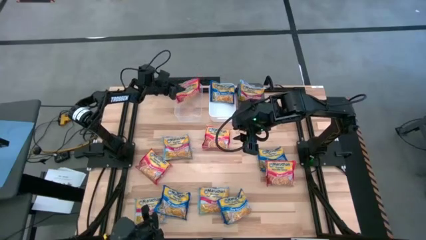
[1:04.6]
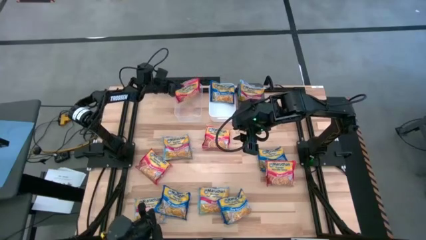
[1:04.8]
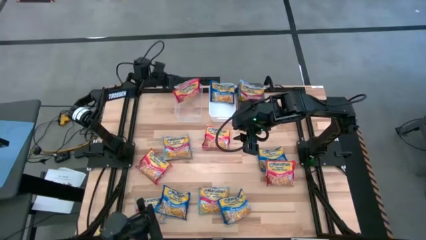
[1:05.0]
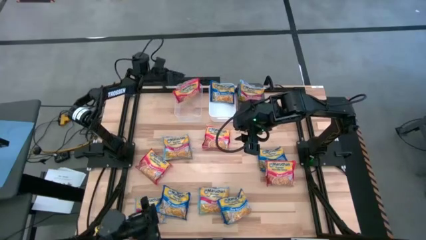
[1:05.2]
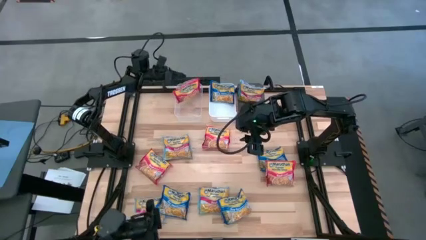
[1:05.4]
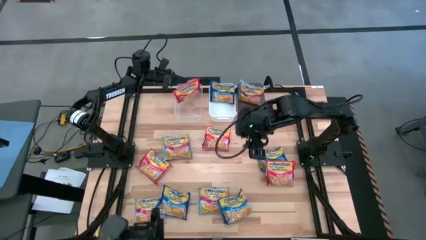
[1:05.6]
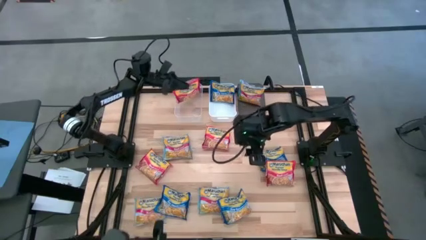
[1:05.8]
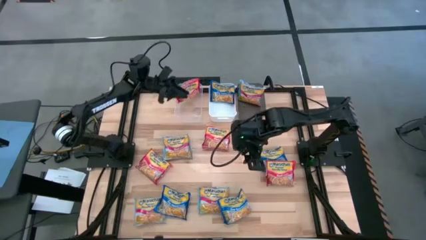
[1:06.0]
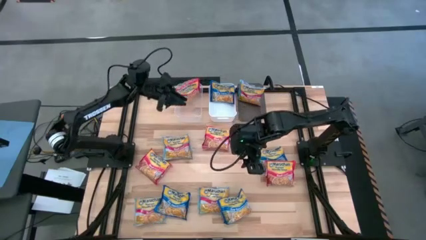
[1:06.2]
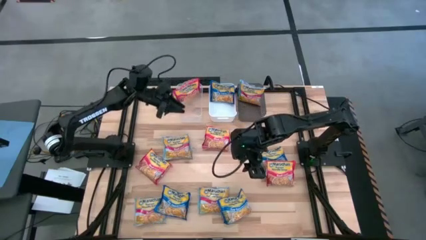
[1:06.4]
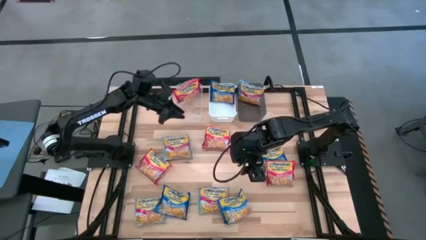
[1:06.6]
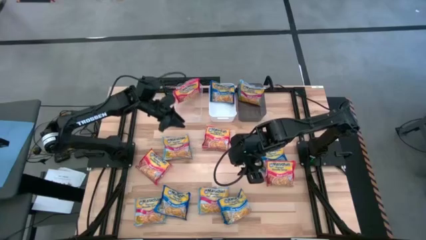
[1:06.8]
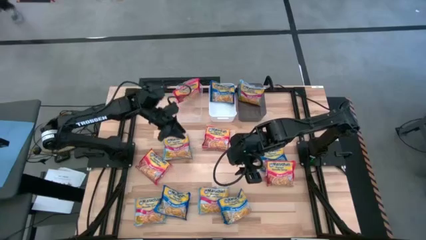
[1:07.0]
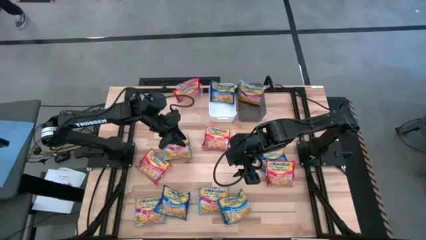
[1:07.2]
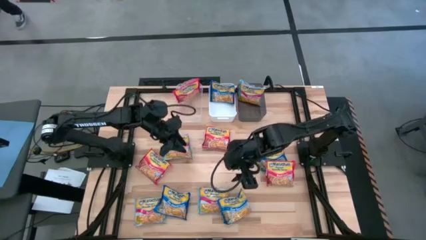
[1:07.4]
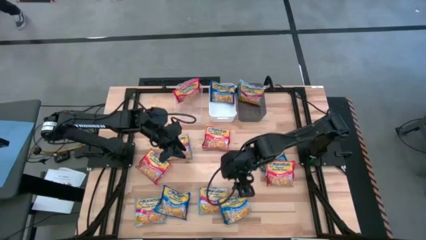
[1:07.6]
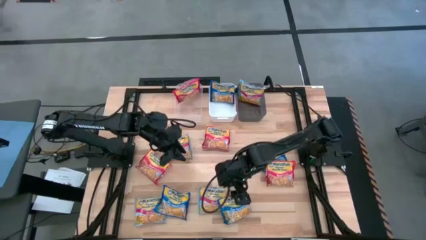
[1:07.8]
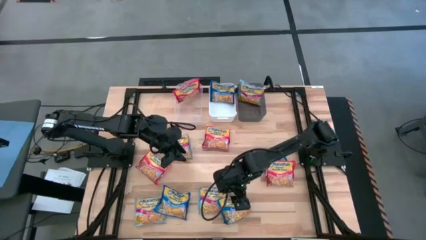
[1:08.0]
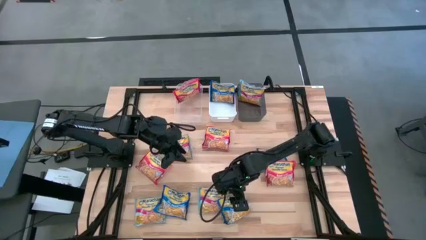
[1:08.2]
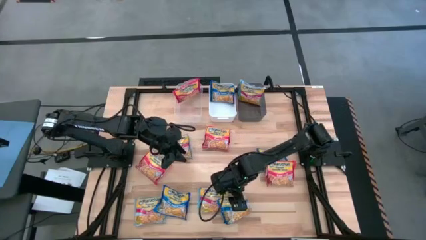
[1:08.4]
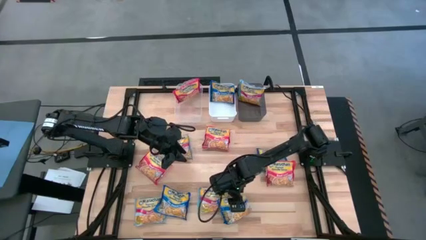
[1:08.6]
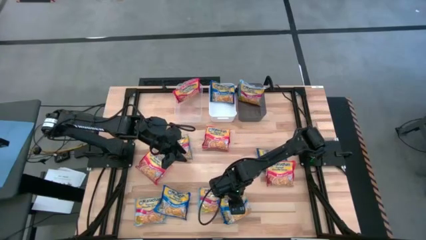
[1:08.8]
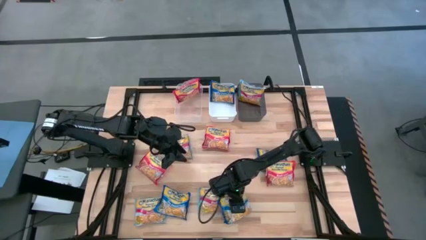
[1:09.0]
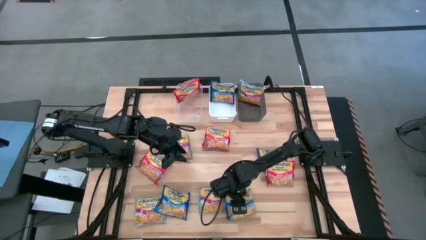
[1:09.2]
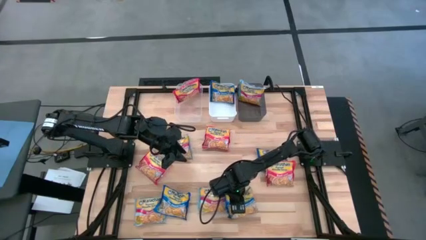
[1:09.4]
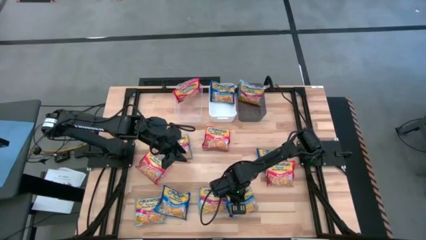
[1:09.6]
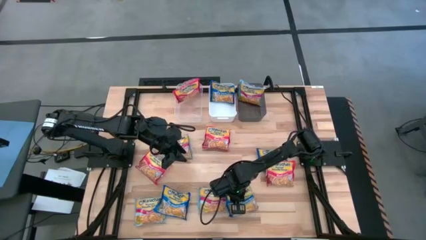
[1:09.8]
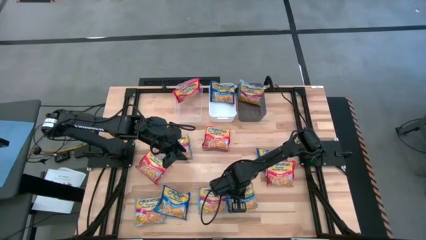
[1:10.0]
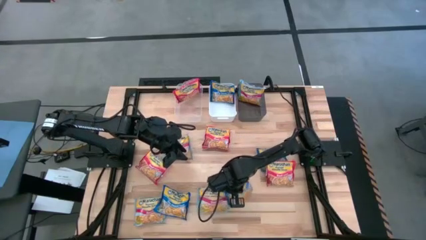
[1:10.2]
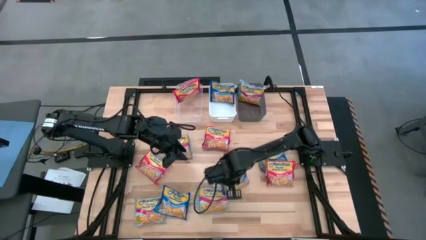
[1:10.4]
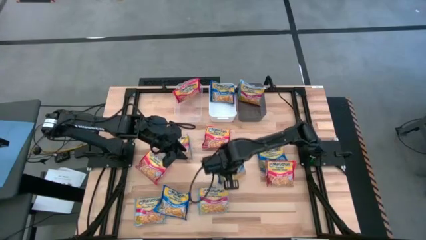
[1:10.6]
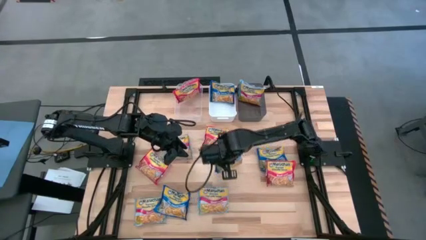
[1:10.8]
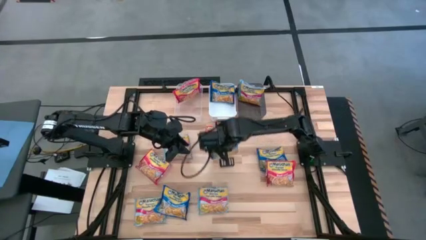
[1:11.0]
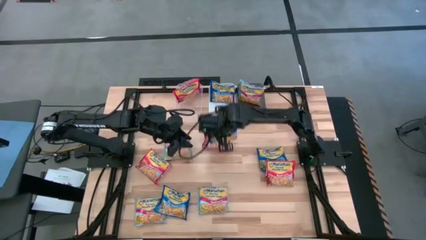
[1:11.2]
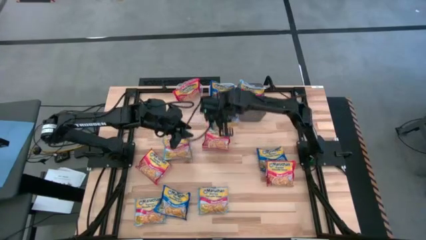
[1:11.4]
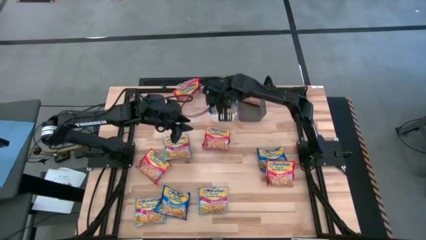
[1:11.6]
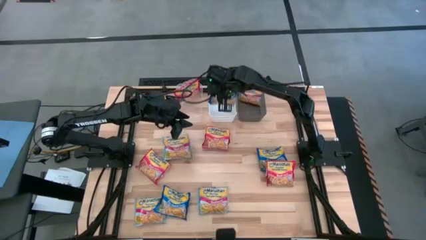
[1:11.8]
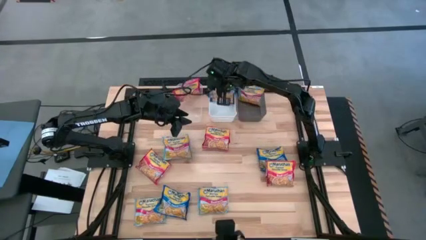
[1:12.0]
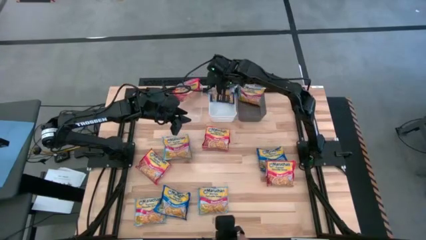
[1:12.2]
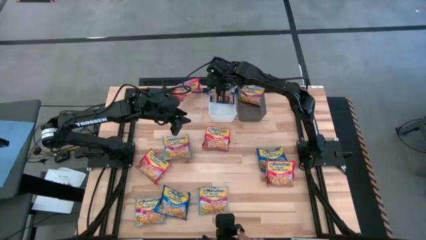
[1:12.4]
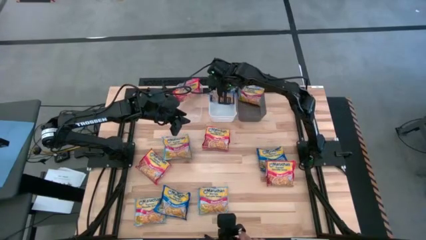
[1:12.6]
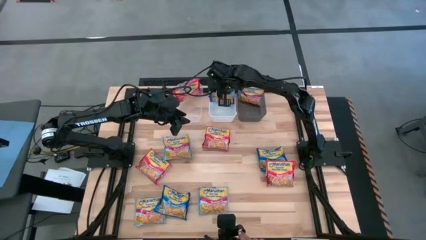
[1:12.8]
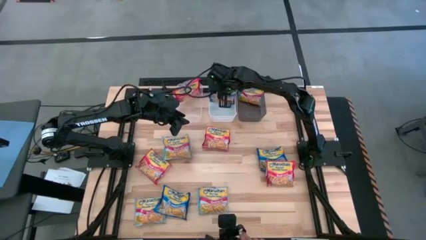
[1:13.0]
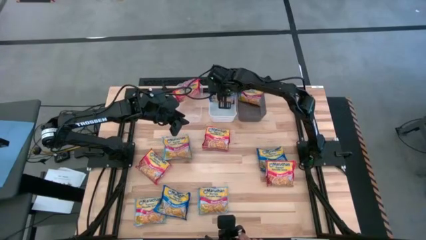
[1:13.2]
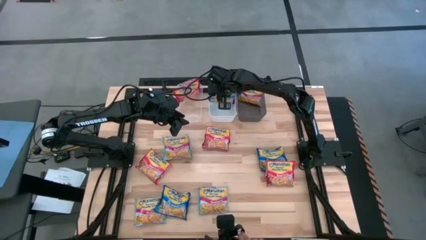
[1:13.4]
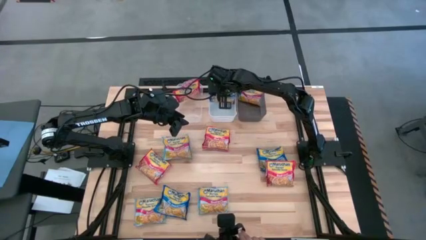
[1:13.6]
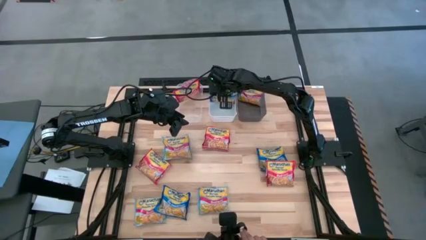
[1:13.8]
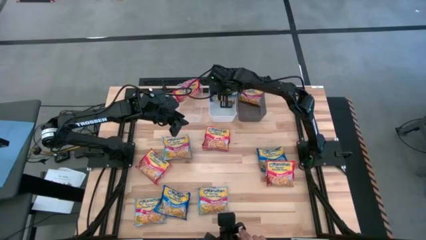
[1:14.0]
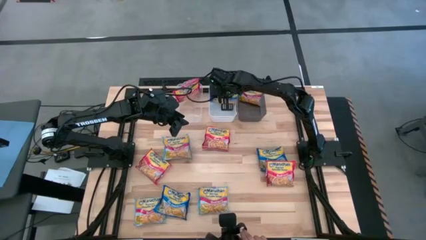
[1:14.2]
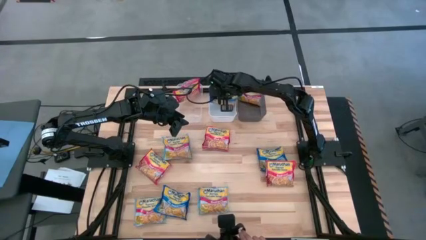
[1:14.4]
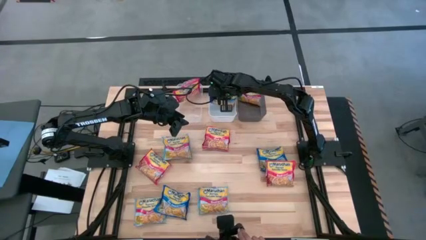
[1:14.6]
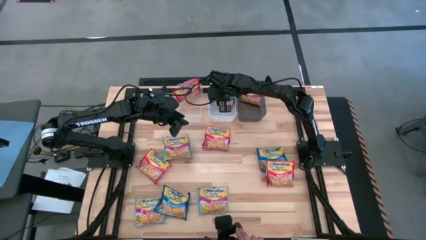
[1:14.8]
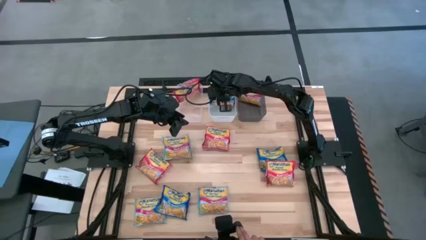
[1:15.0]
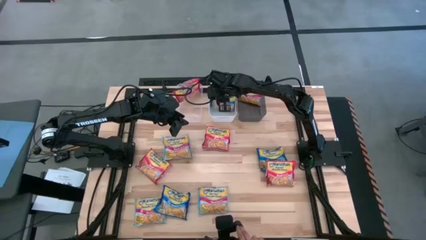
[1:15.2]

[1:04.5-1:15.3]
Task: Sort Maruchan noodles
Put the blue noodle pack into the white bin

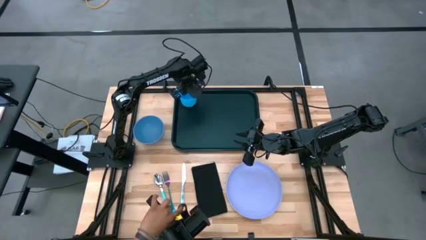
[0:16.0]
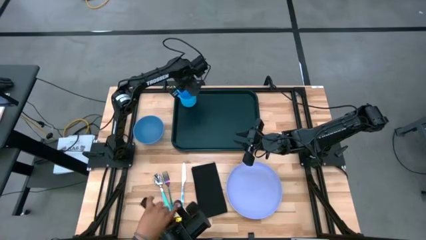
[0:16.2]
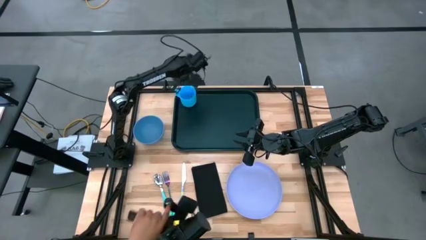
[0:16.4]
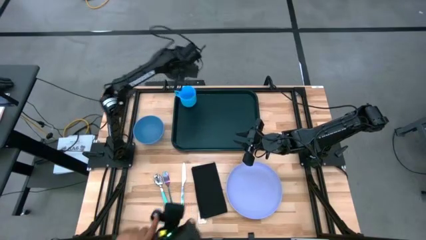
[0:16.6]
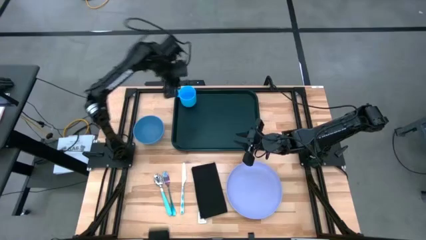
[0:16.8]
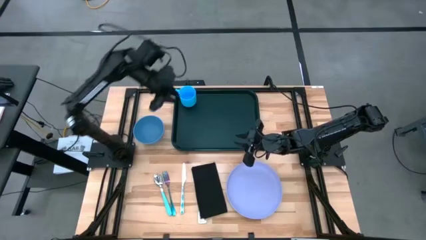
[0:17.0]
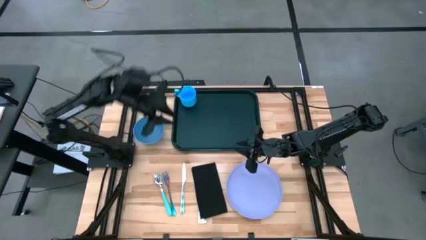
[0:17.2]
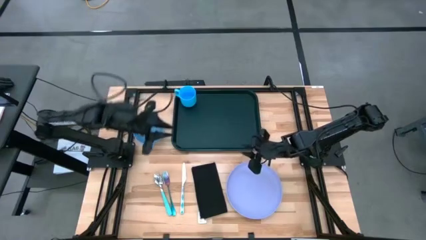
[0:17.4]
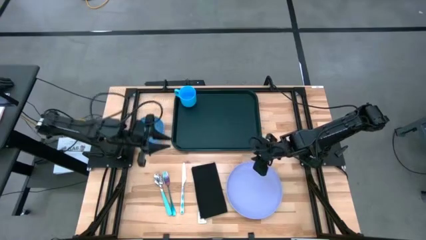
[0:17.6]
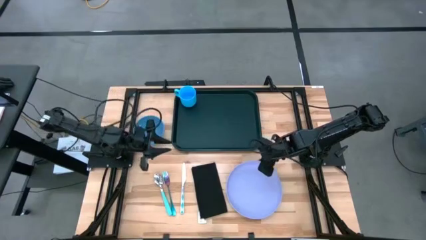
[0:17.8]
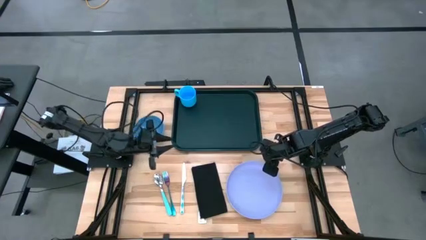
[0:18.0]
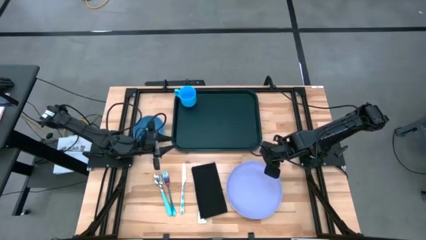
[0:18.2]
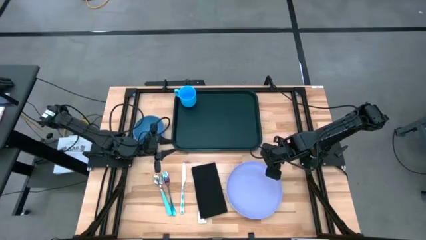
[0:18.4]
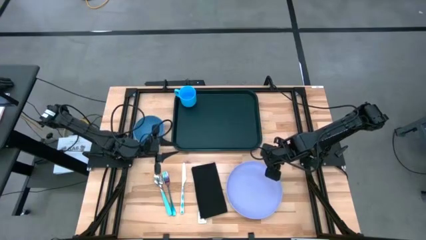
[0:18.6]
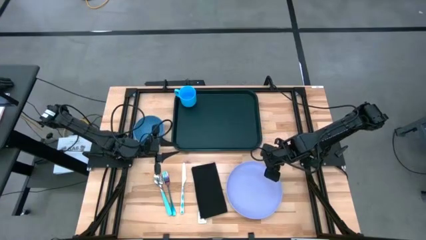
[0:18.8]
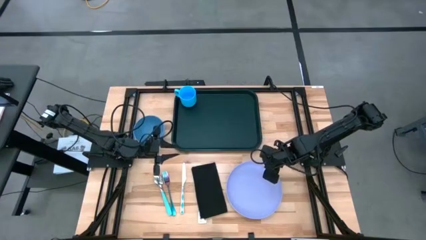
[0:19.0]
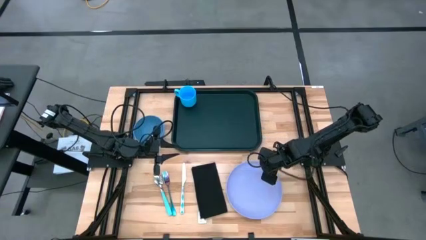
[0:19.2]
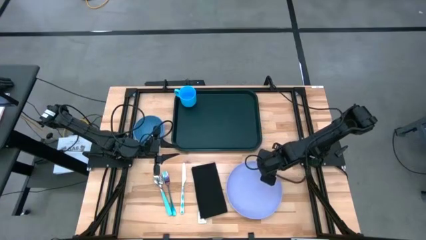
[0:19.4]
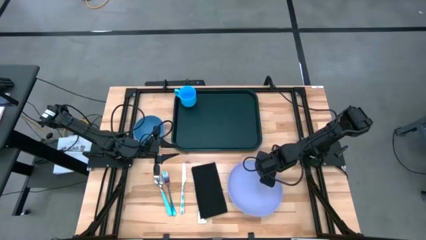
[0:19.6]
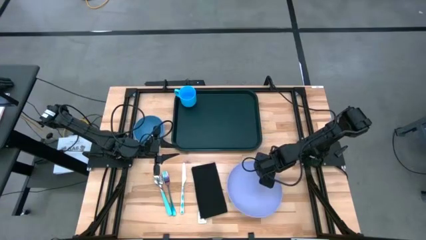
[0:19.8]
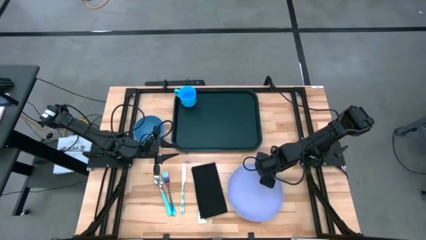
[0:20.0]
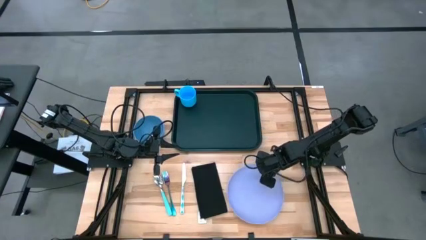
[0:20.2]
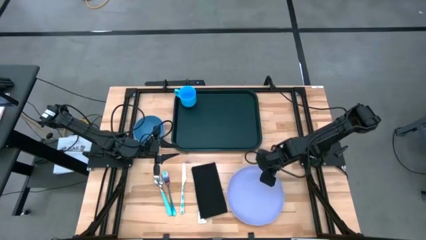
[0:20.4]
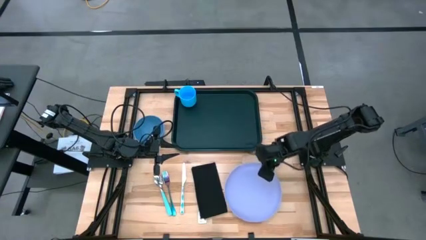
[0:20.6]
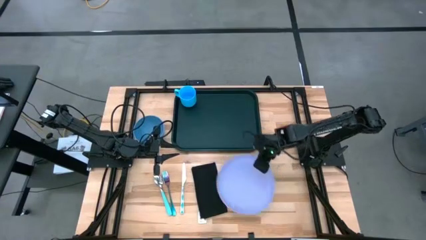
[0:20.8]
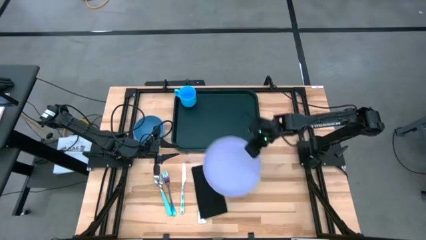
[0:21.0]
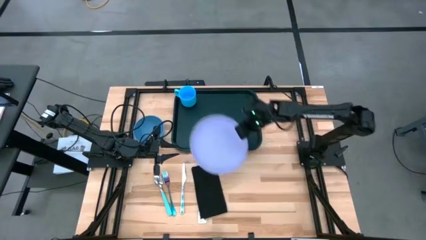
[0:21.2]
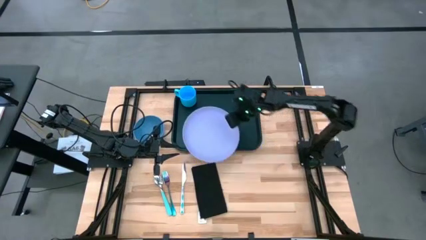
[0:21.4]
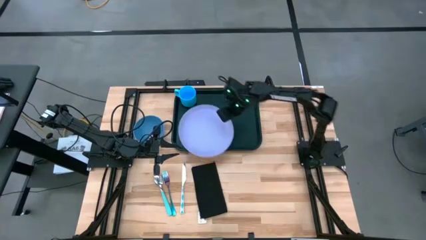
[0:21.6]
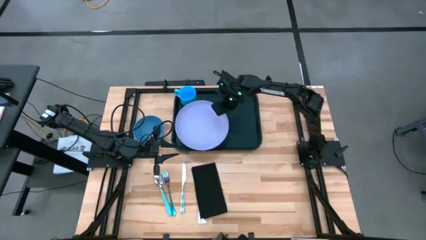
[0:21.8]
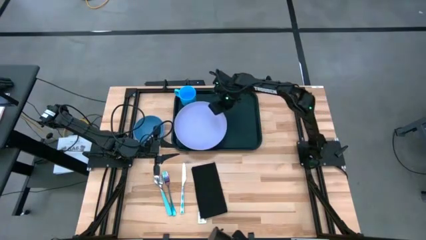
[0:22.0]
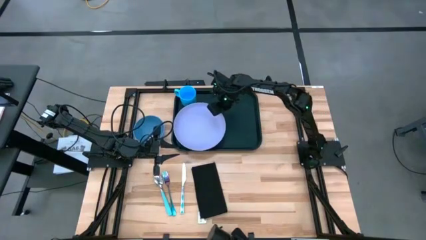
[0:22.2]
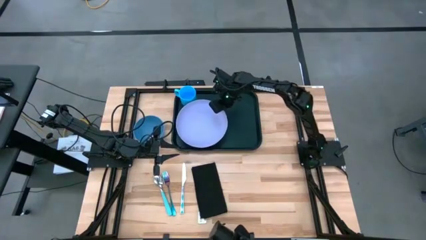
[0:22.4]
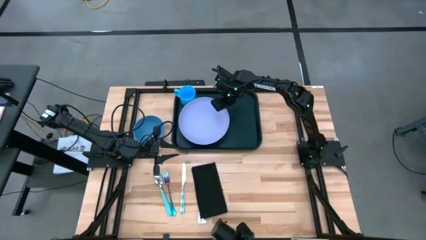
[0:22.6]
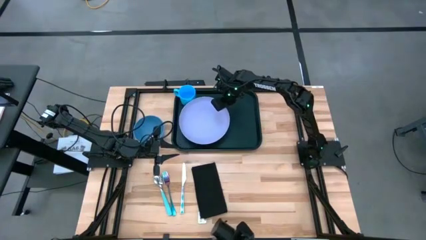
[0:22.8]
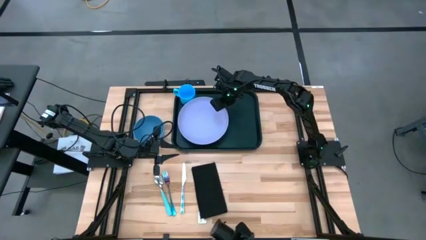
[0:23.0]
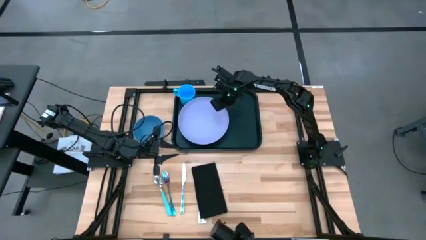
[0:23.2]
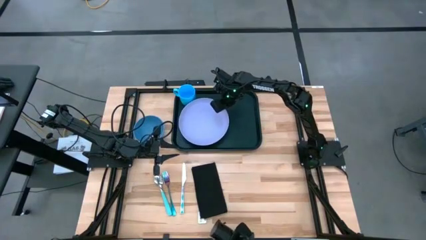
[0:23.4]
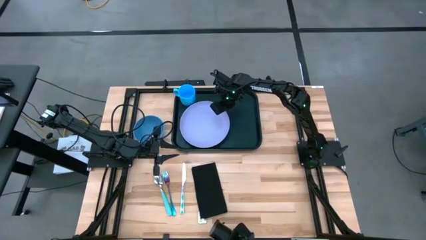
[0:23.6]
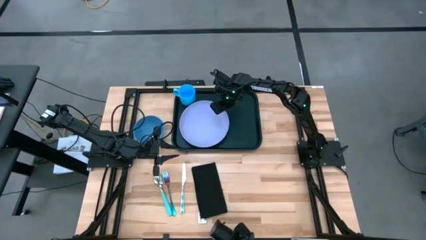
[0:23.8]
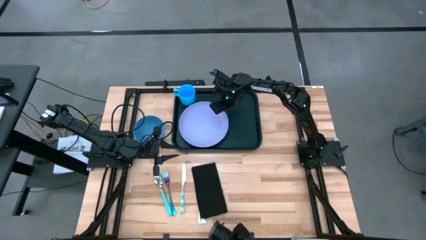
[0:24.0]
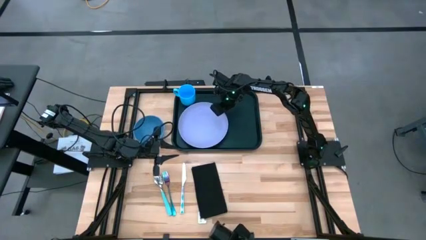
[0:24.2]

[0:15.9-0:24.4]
Task: Set up tray
Put the purple plate on the black tray below the blue cup
